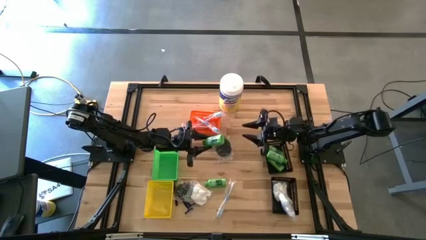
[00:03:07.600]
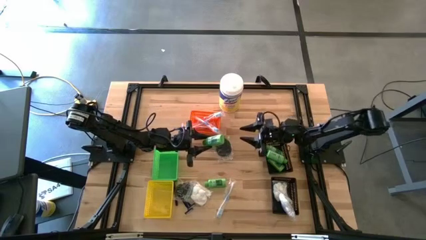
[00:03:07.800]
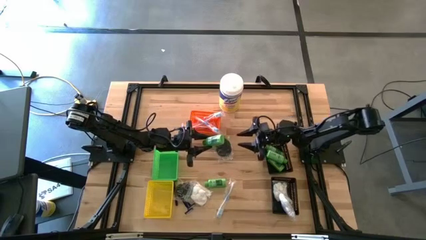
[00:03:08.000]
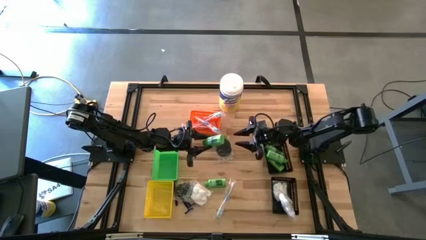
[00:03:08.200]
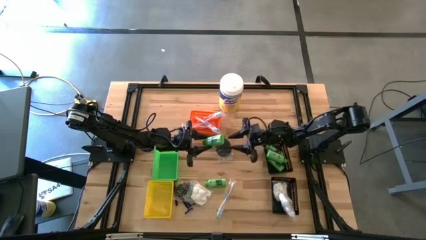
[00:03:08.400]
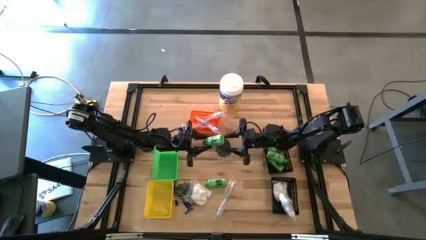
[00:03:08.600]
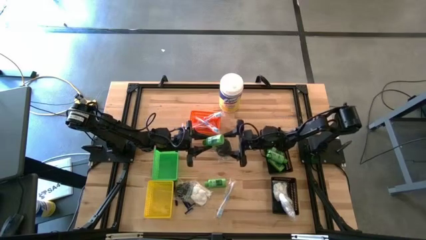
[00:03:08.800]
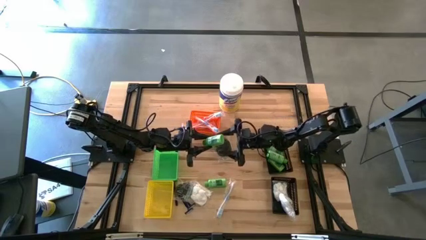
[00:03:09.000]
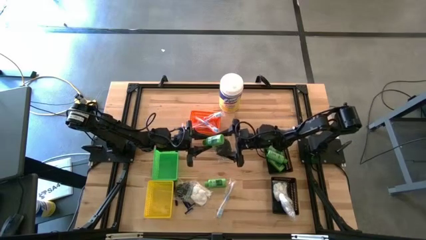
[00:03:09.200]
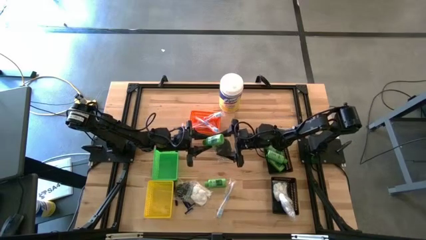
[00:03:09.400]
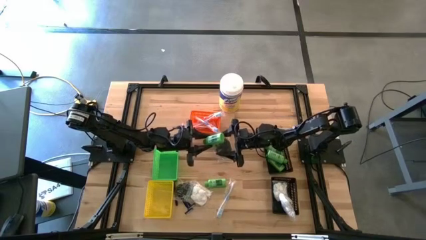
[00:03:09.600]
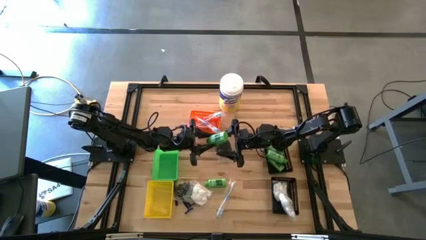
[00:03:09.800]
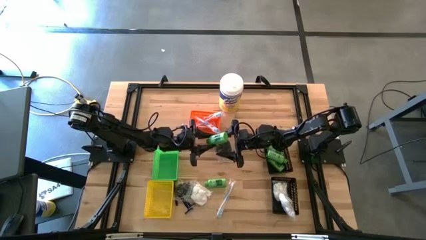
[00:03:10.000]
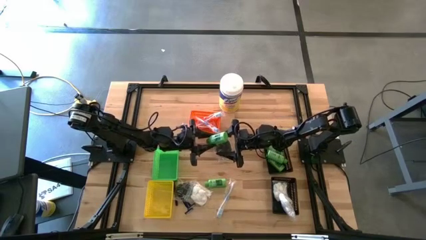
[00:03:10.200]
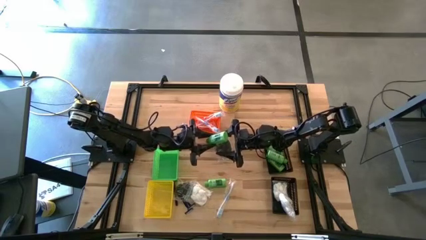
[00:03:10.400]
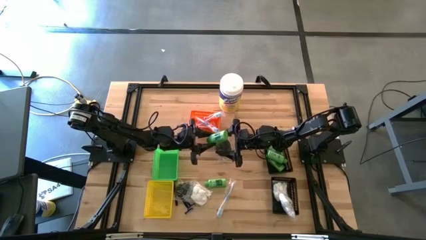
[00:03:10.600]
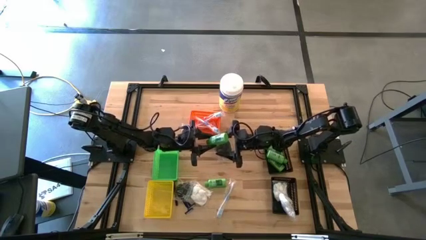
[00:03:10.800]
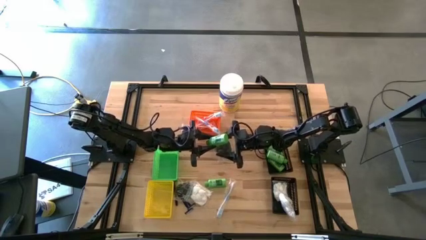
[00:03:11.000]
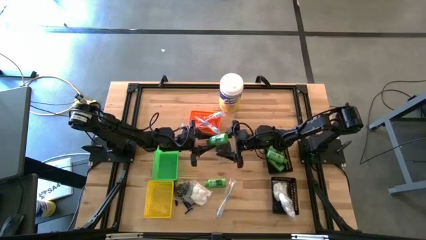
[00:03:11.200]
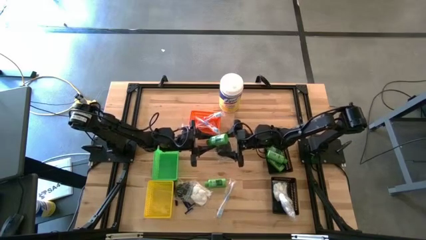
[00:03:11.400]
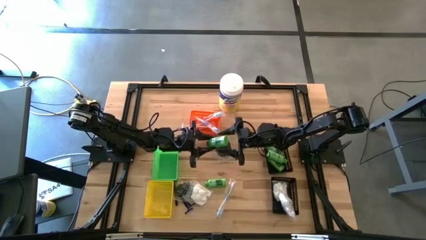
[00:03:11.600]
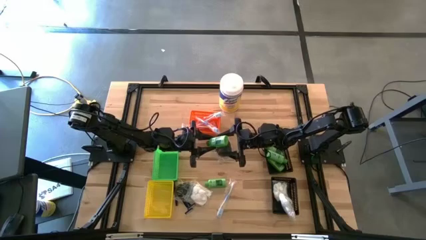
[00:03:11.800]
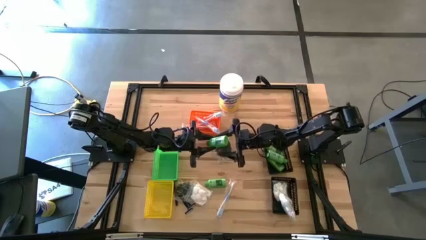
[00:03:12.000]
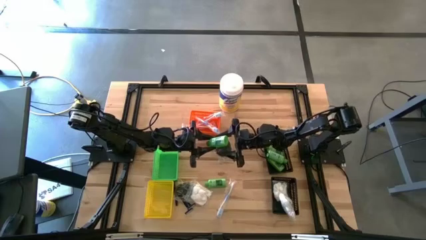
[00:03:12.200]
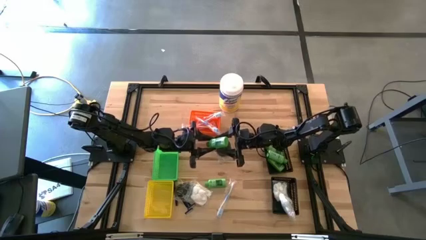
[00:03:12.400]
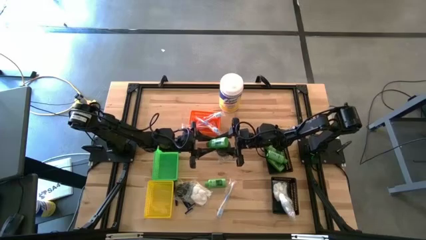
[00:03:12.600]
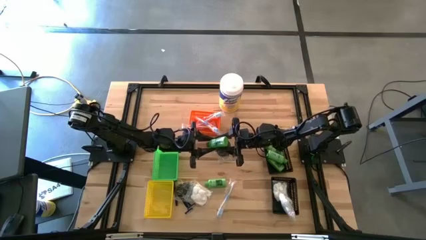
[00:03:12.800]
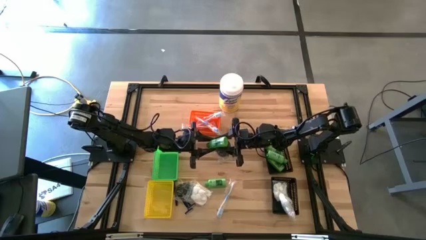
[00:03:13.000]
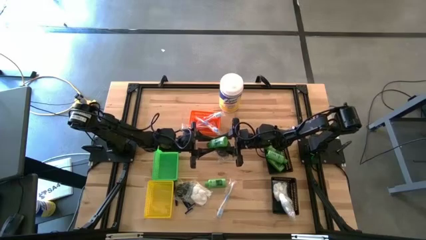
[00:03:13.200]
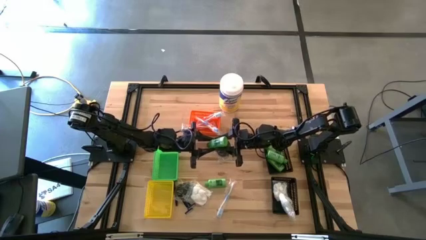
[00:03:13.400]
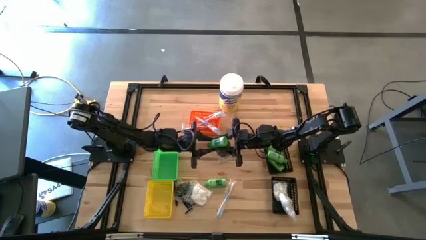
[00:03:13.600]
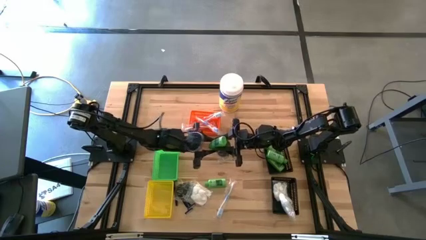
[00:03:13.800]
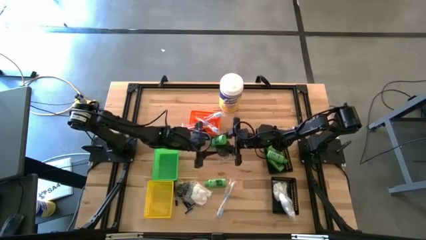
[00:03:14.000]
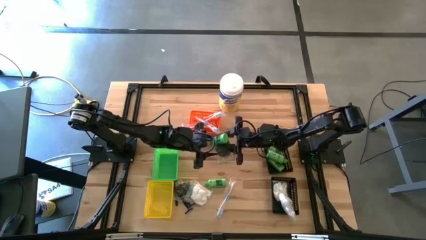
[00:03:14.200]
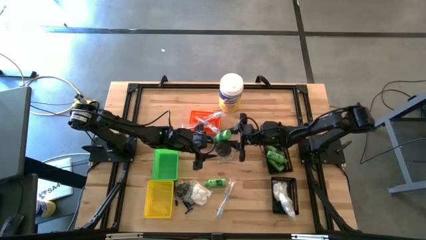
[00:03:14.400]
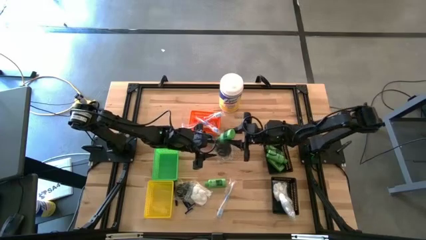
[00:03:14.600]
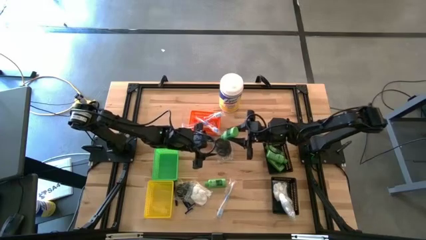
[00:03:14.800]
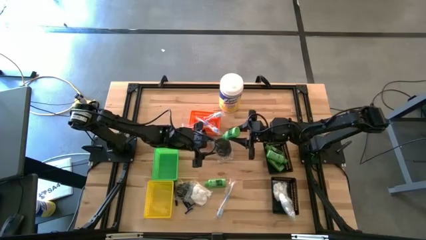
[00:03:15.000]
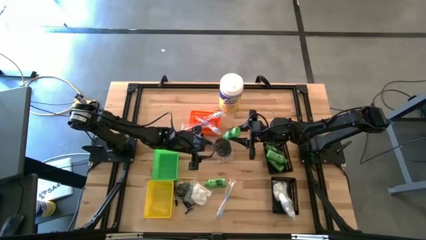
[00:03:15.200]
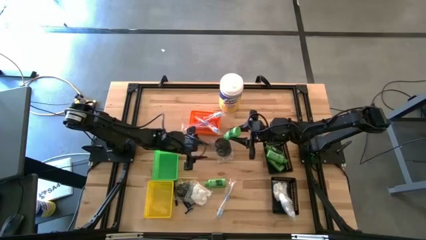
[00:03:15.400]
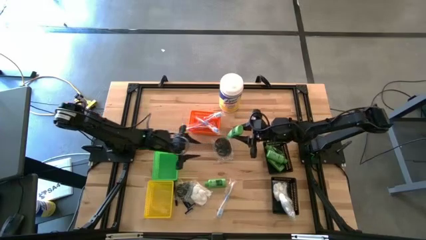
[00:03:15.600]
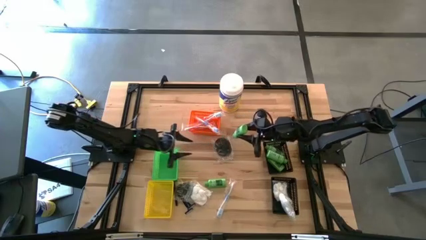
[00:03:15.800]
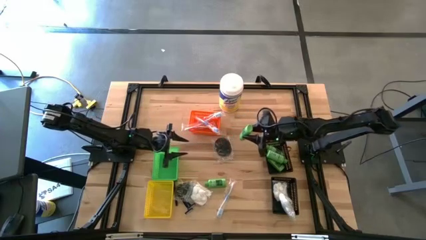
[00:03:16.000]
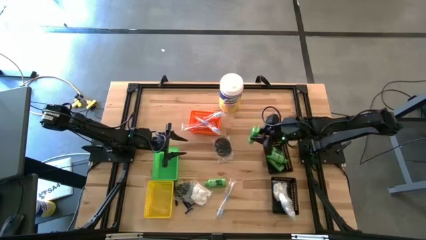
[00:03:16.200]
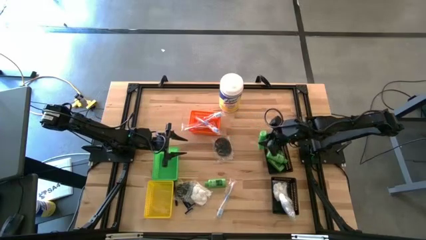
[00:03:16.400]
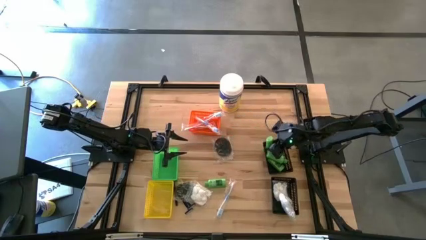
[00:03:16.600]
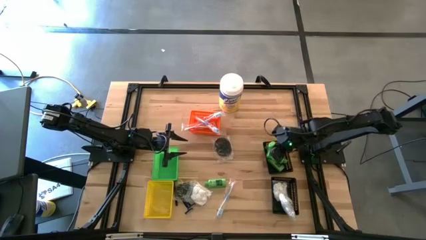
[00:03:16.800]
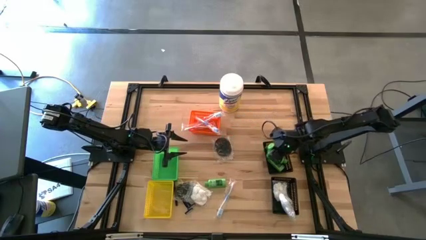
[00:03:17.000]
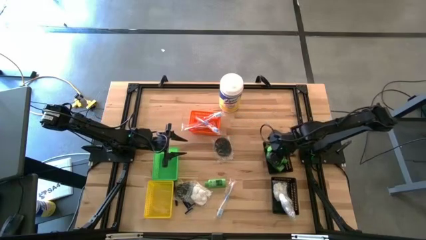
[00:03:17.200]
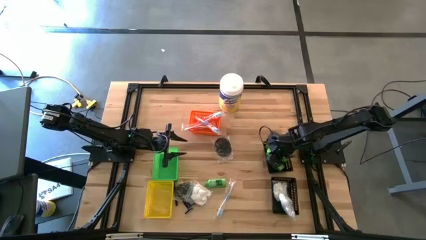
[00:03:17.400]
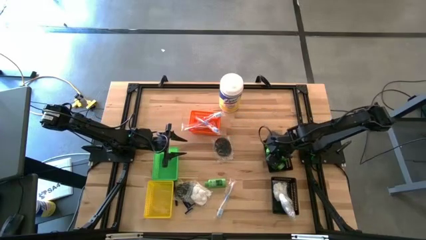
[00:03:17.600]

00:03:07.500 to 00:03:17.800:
Task: Pick & Place Travel size toiletries
Put the green shampoo into the top black bin

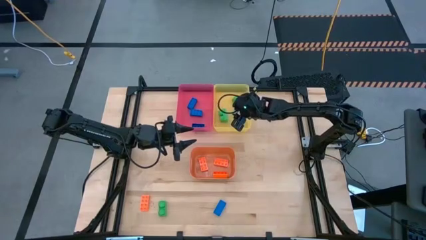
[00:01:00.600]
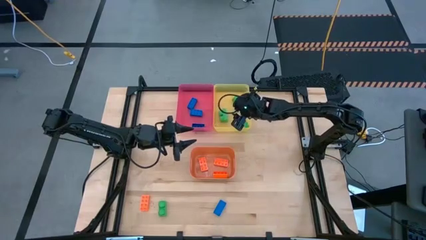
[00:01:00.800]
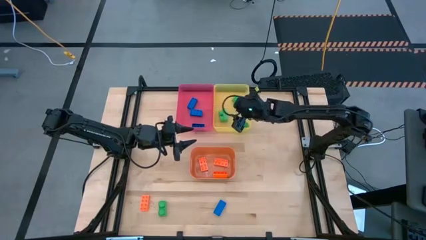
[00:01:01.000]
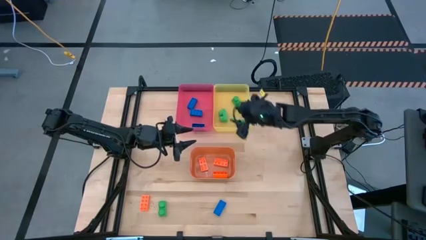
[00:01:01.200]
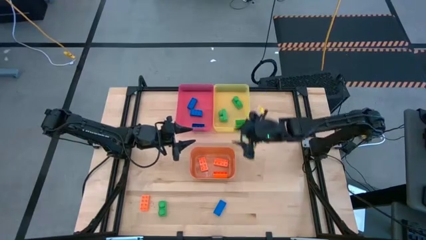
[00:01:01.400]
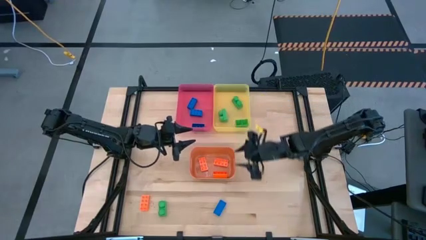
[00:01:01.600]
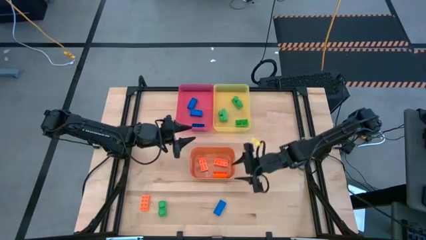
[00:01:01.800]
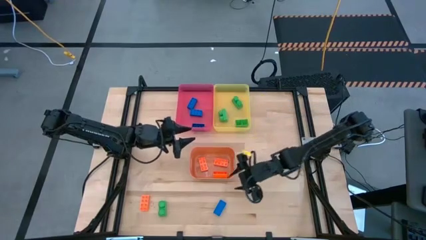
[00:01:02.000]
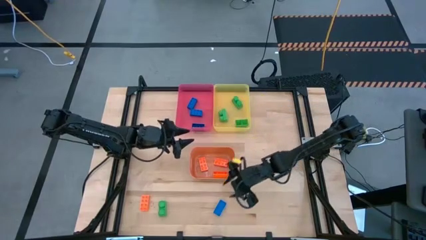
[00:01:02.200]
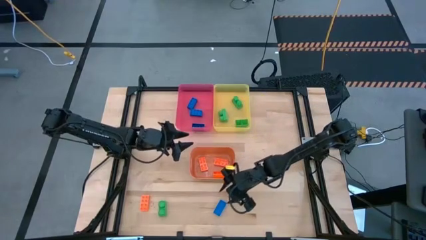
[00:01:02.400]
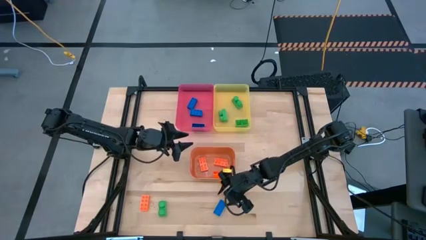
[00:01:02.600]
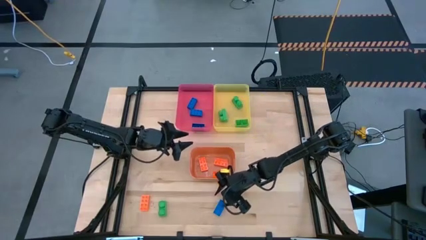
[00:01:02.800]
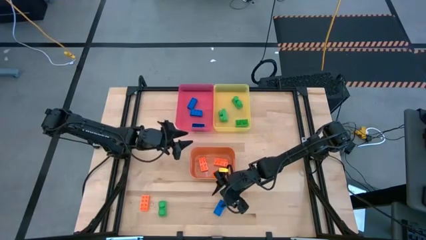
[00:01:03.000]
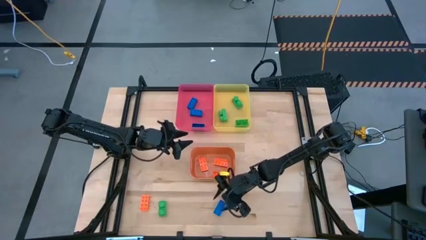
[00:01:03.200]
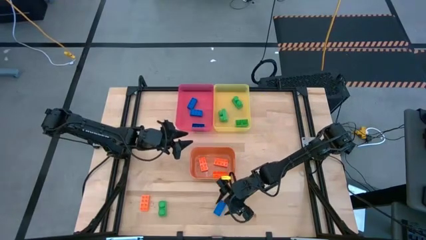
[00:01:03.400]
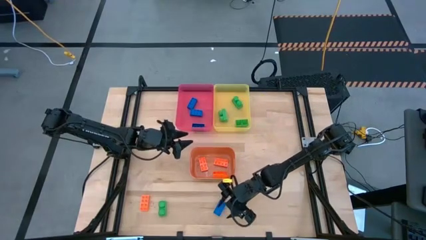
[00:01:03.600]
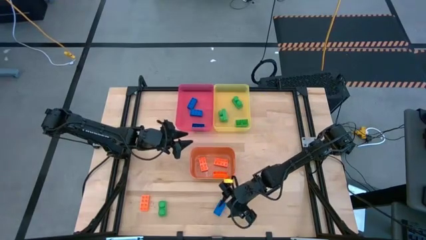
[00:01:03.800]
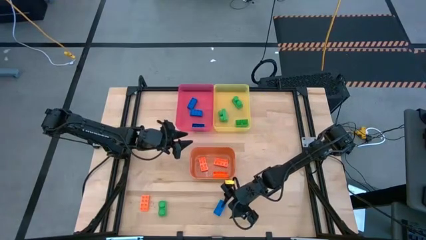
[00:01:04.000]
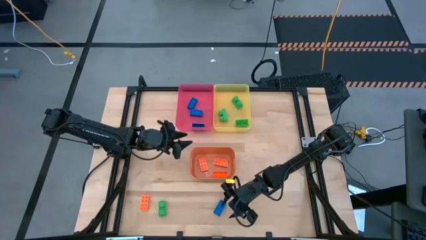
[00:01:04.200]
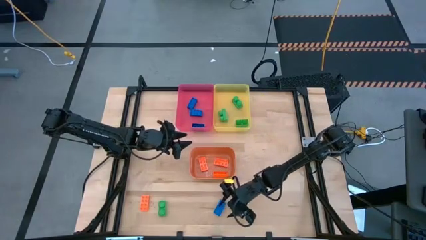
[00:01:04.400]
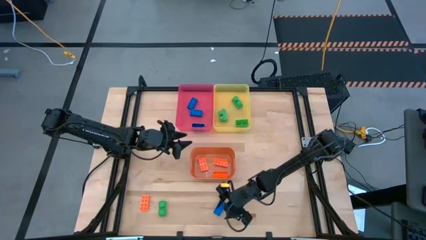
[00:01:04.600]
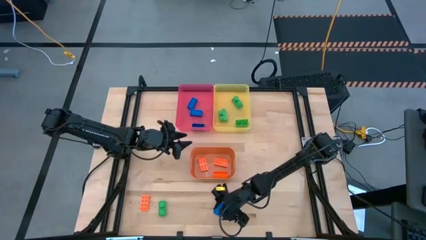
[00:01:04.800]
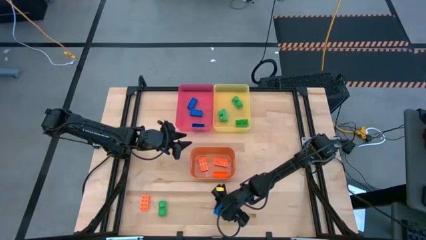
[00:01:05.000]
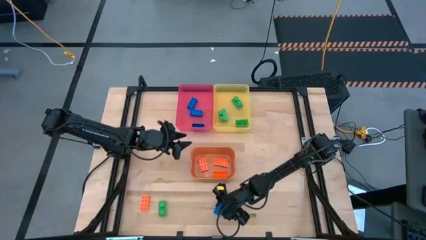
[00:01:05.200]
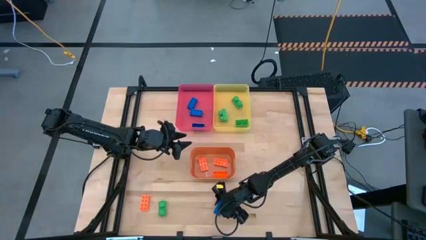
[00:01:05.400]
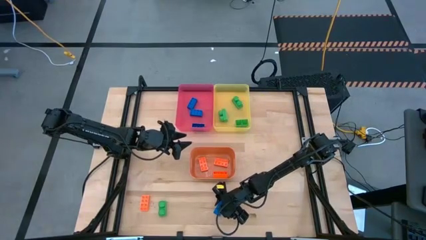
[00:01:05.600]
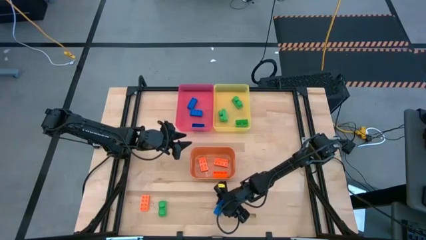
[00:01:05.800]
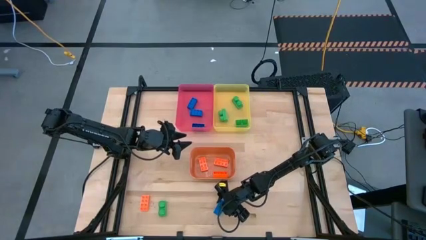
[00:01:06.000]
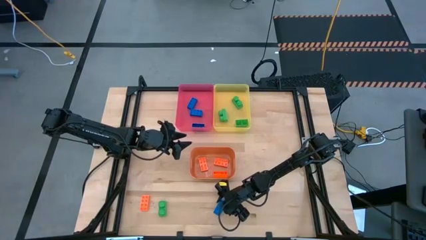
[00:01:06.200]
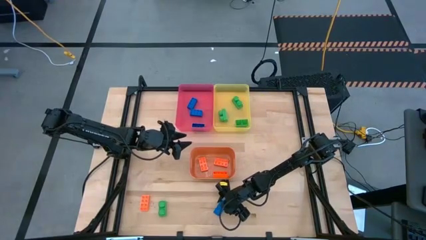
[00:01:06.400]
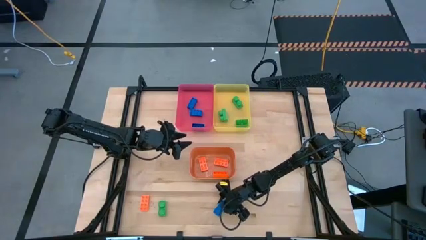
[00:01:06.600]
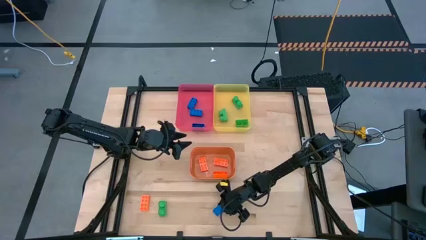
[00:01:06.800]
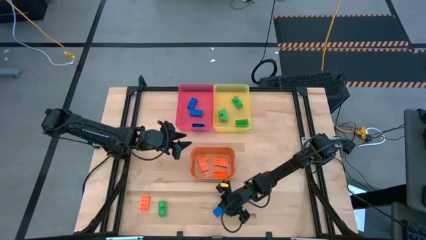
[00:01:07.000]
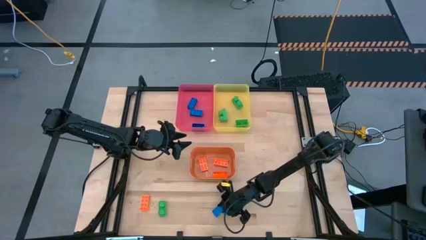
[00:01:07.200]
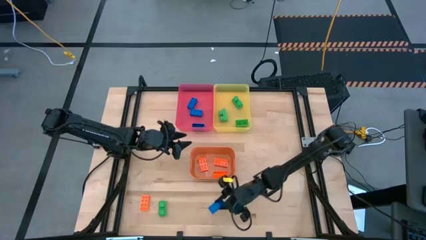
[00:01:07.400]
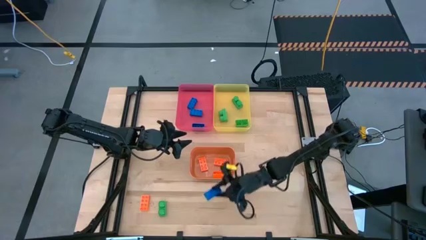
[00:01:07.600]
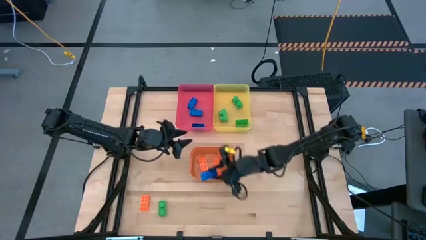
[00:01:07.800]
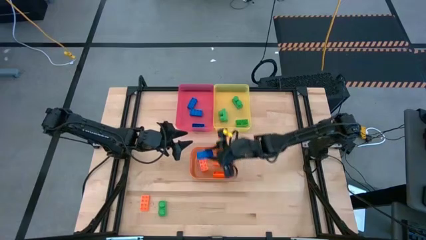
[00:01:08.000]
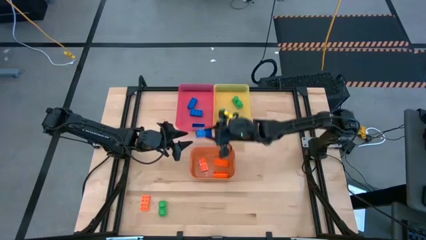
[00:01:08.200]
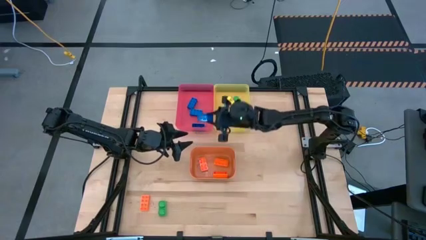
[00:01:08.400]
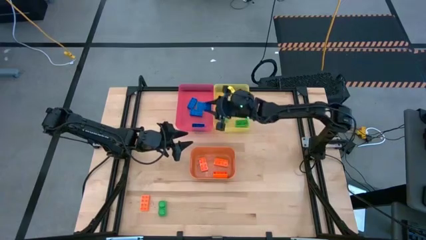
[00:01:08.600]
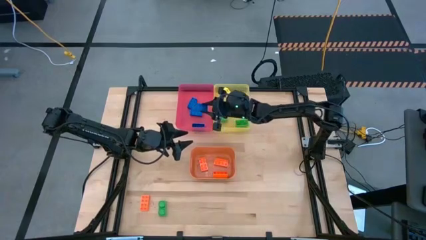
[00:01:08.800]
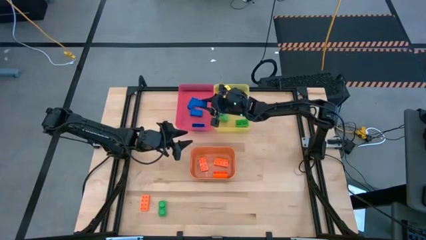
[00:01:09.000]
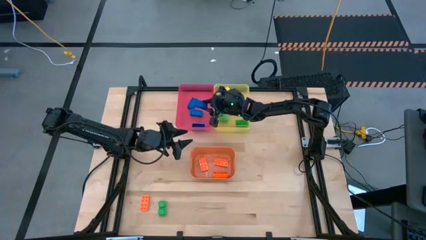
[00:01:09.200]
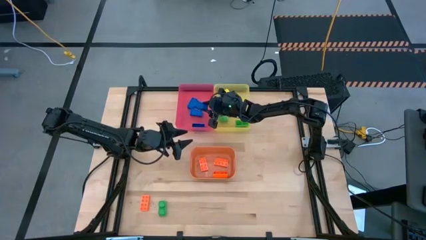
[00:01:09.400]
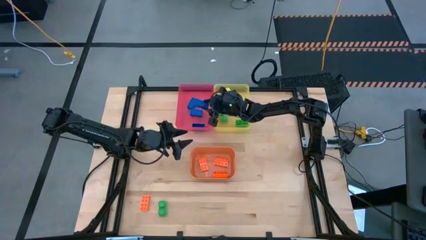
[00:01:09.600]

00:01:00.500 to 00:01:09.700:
Task: Sort & place blocks by color
Put the blue game piece into the red bin
